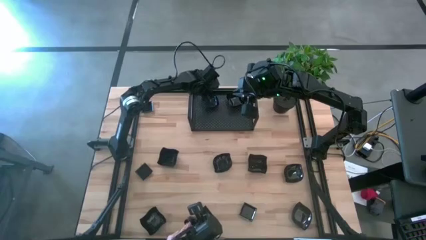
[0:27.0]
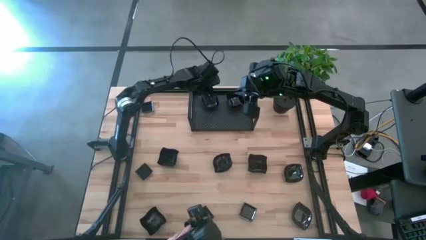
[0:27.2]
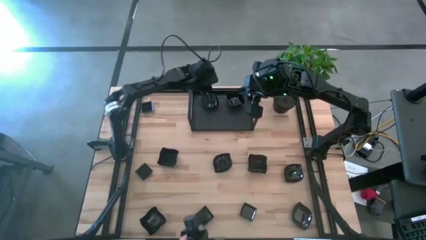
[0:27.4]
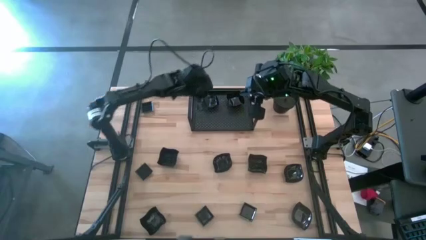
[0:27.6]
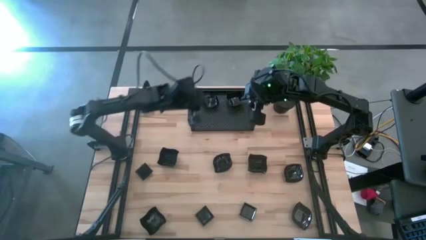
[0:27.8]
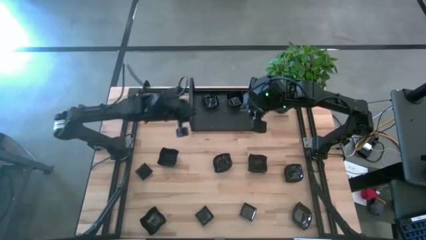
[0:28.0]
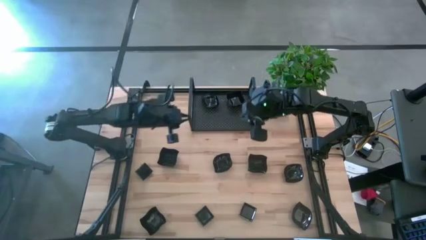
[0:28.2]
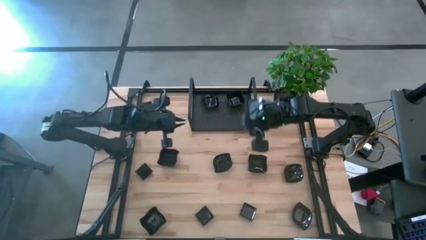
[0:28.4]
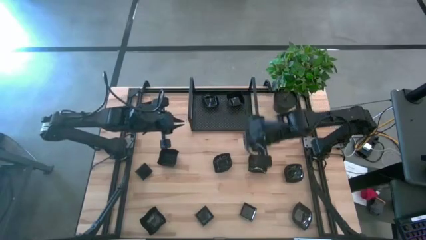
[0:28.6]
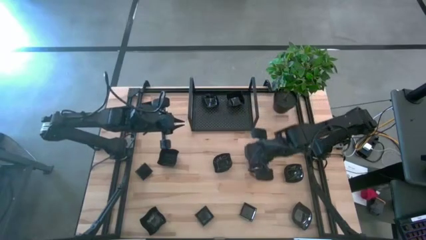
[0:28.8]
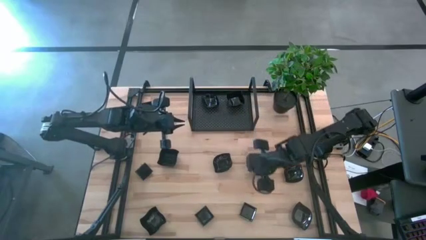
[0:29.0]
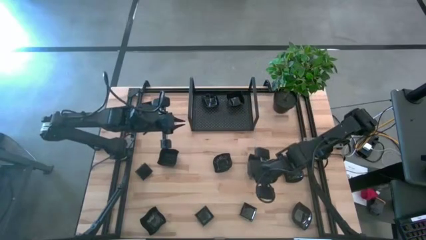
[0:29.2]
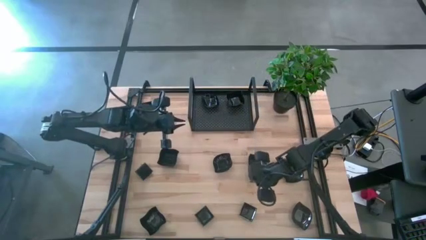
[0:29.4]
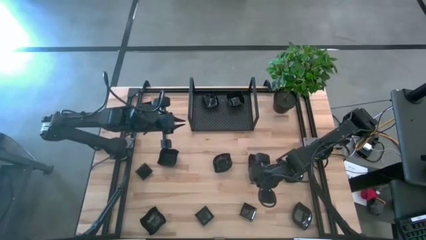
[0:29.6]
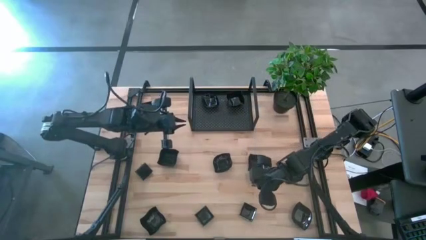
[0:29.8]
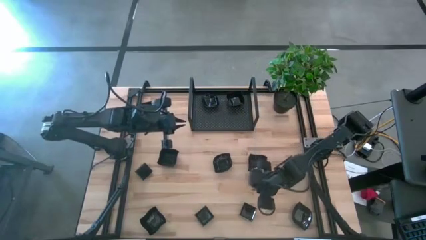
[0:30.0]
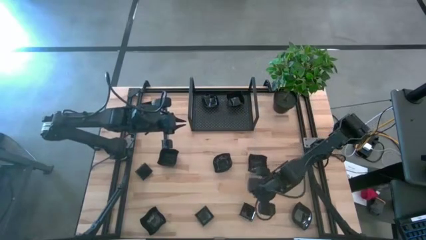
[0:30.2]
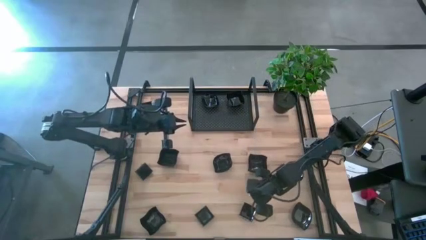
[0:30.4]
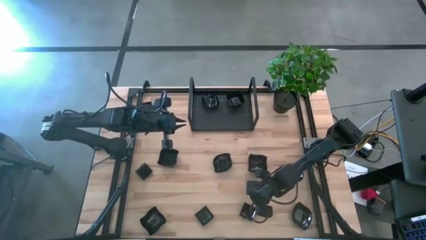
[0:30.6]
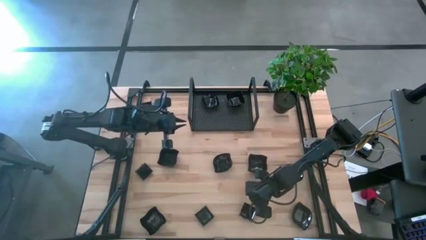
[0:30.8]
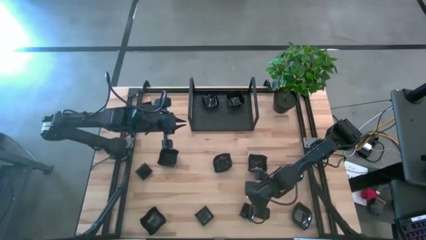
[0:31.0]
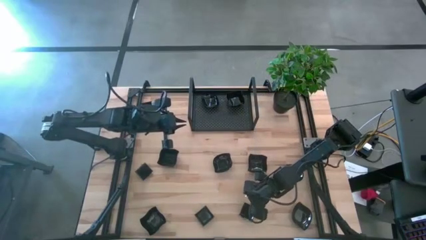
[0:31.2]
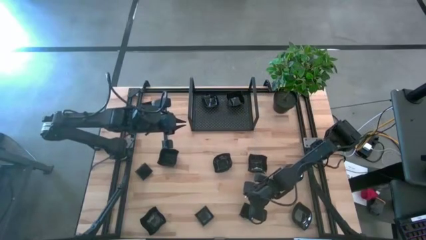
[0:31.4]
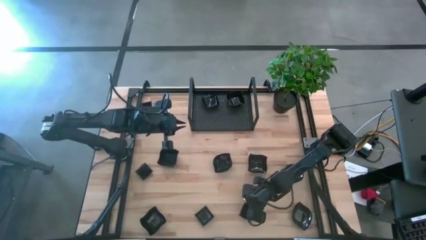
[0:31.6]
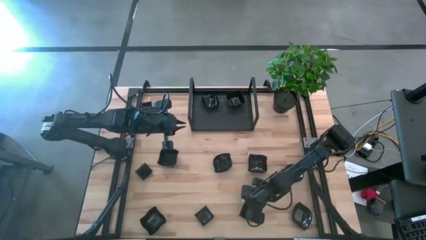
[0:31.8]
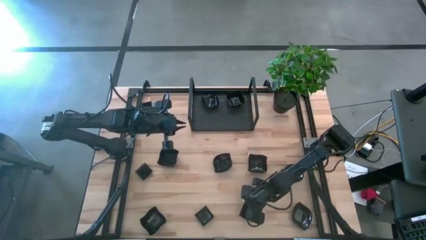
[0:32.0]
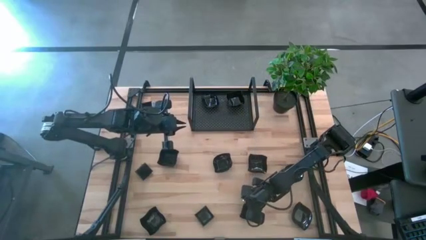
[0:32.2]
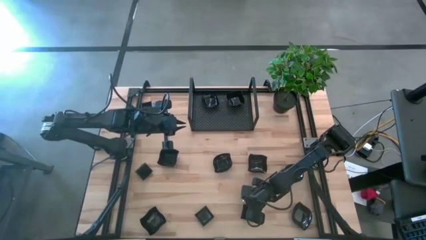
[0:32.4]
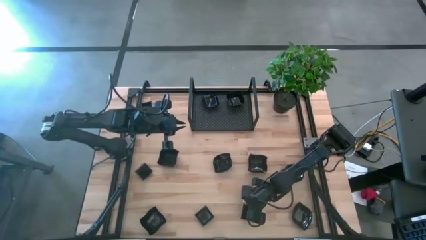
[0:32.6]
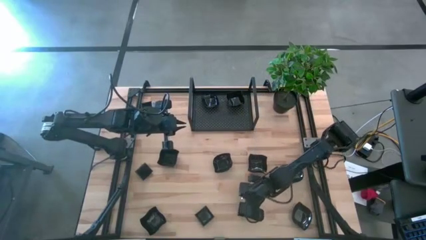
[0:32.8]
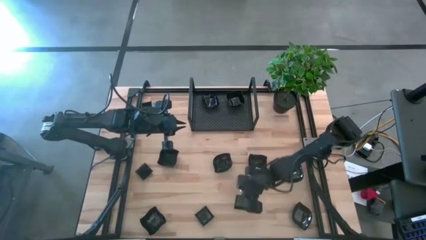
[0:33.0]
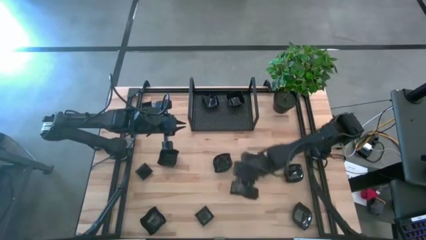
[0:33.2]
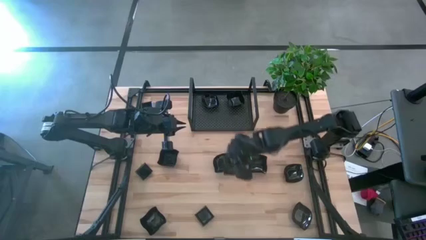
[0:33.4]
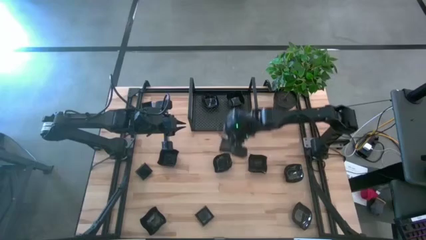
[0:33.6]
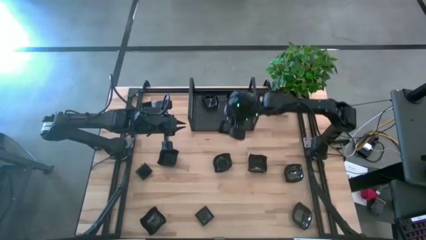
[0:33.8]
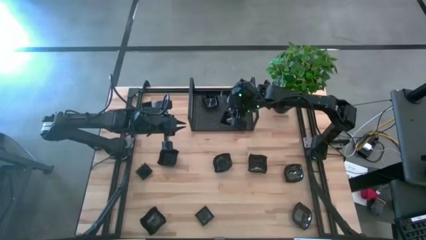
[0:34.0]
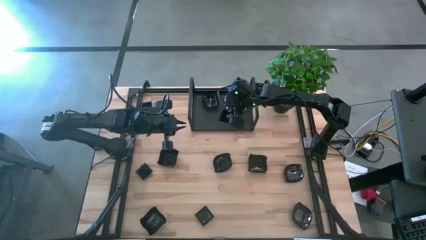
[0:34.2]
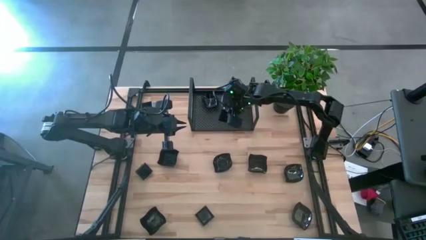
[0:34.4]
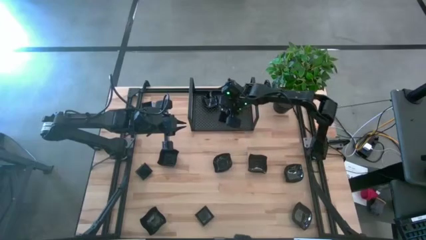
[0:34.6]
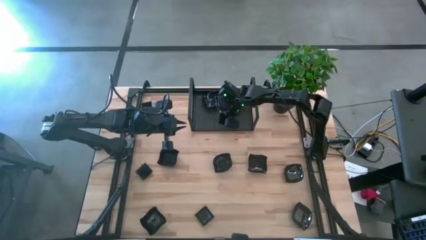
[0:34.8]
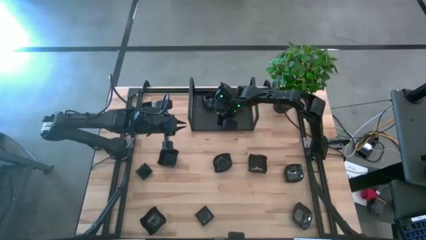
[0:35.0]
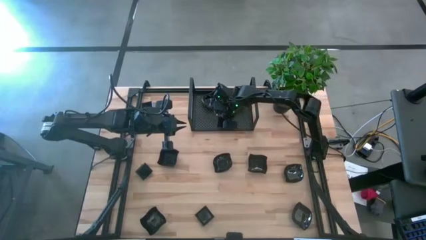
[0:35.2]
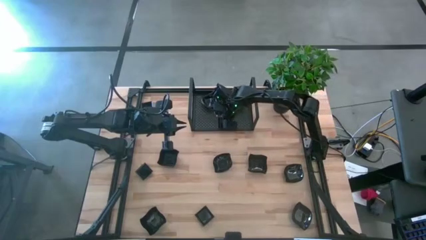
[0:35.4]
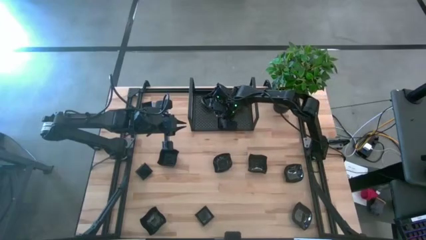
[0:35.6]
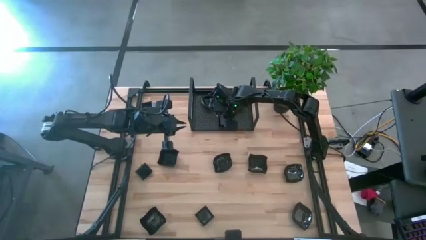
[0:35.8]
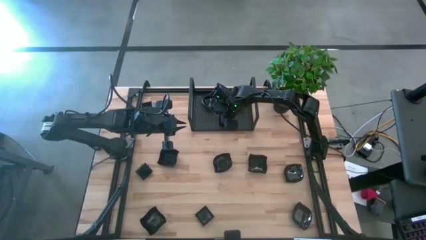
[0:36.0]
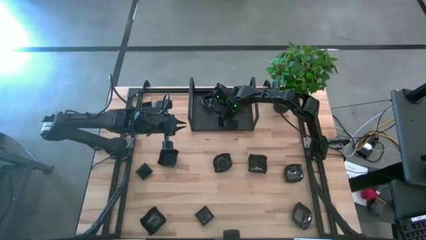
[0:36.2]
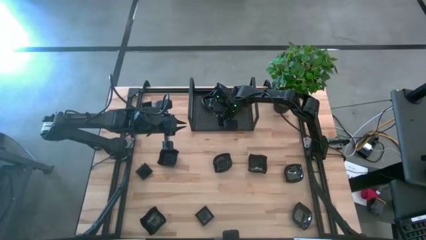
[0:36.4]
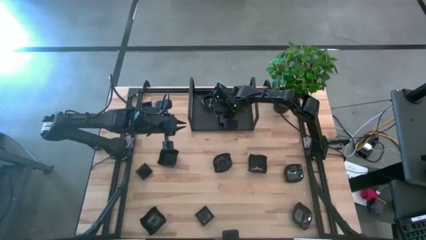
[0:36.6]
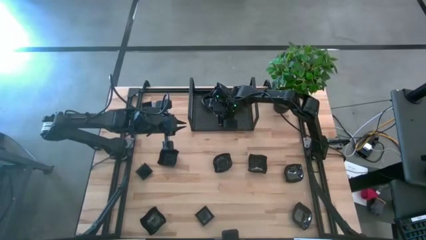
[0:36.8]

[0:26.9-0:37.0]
Task: Pick & Place Mini shaped plates
Put the black square plate on the shelf

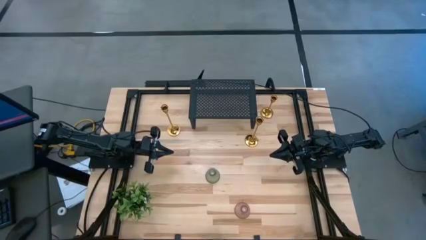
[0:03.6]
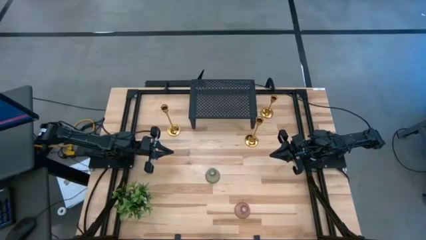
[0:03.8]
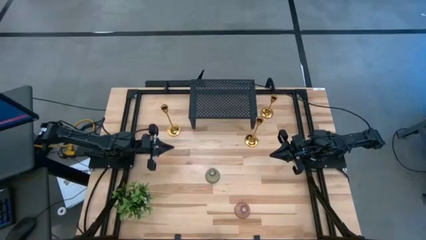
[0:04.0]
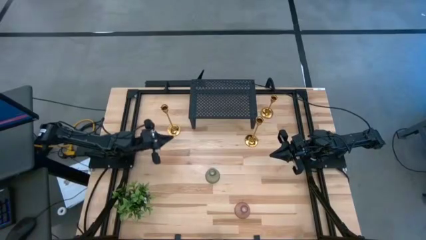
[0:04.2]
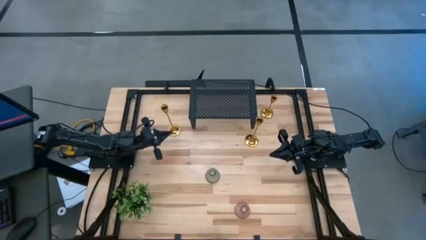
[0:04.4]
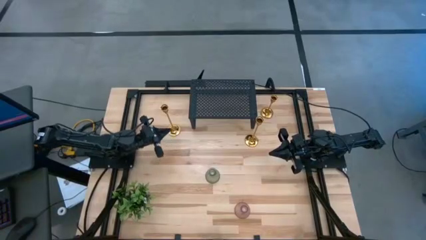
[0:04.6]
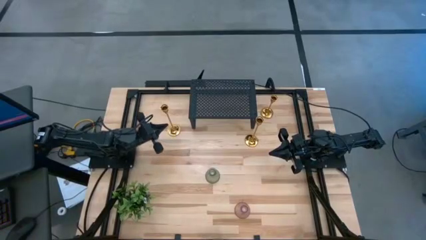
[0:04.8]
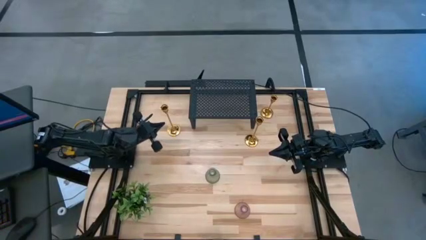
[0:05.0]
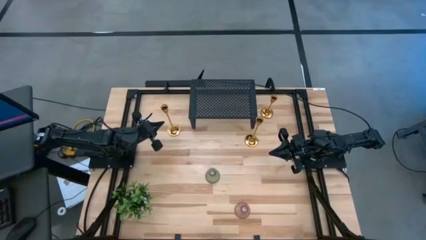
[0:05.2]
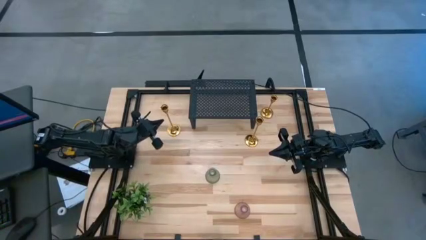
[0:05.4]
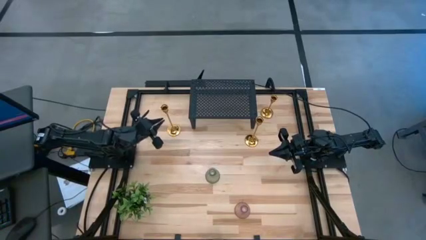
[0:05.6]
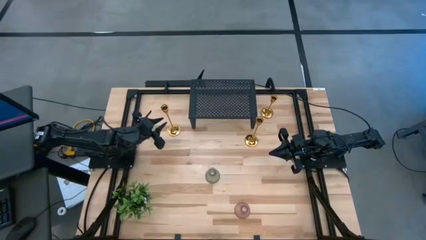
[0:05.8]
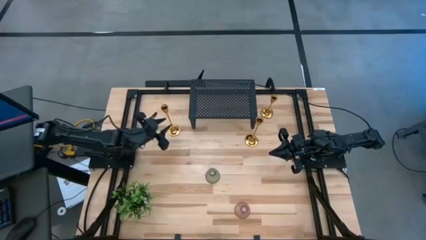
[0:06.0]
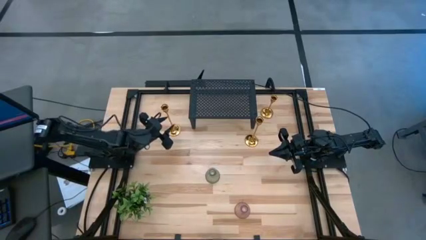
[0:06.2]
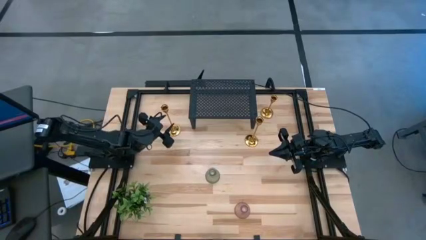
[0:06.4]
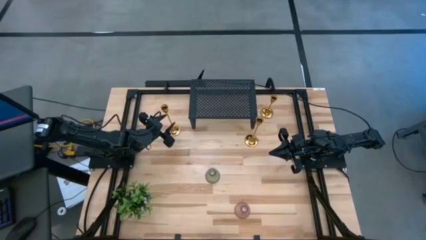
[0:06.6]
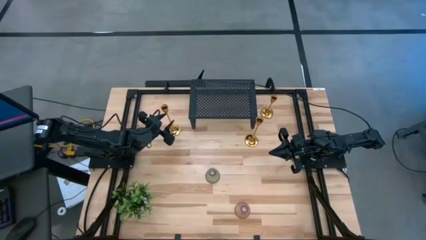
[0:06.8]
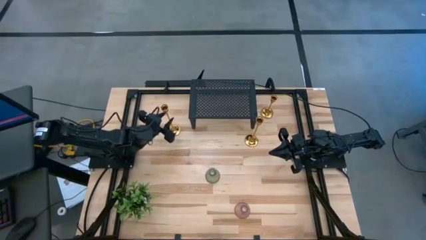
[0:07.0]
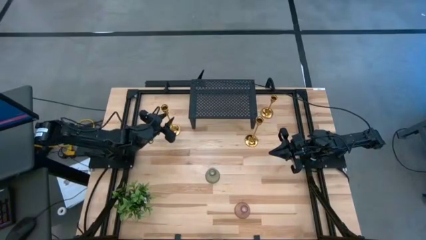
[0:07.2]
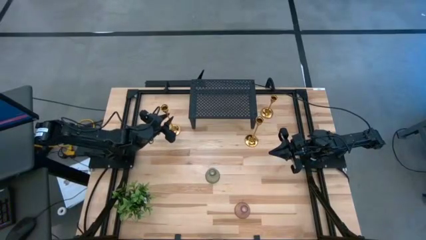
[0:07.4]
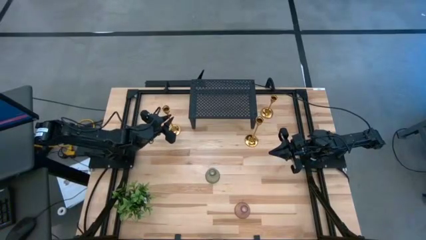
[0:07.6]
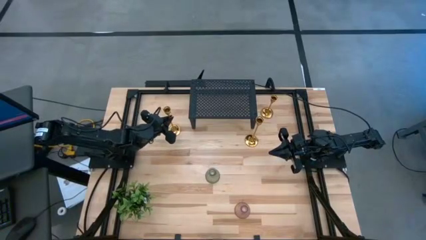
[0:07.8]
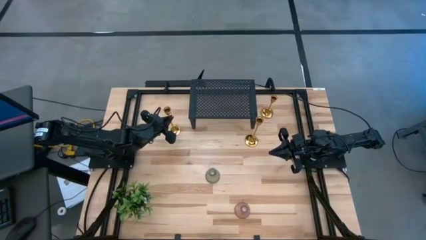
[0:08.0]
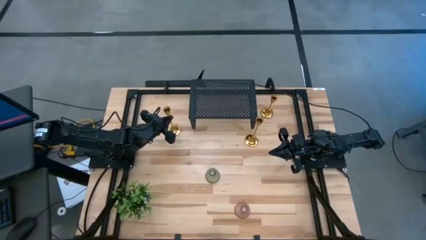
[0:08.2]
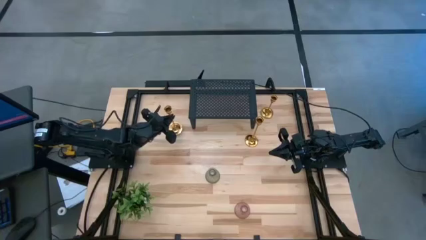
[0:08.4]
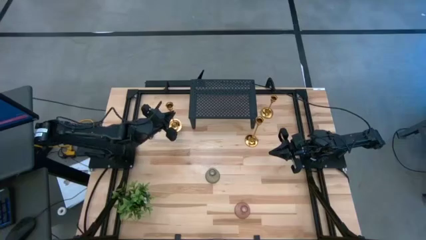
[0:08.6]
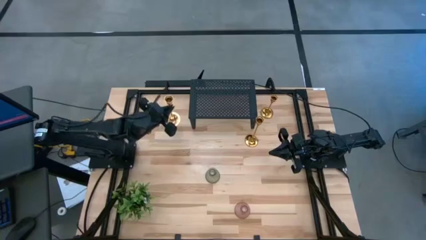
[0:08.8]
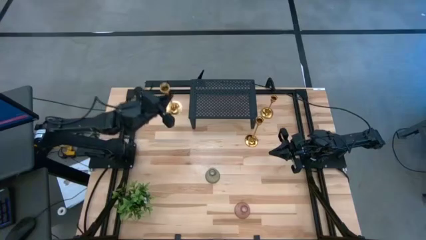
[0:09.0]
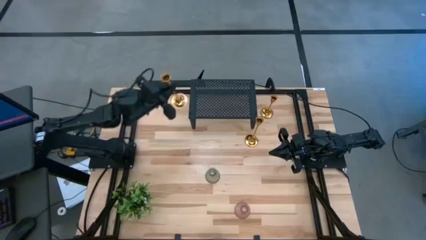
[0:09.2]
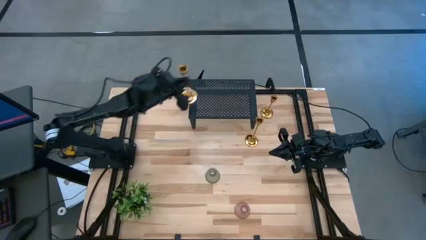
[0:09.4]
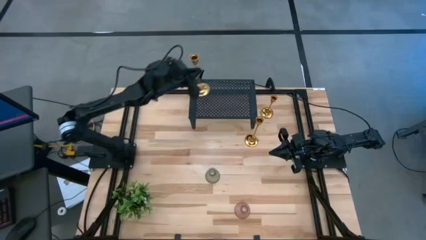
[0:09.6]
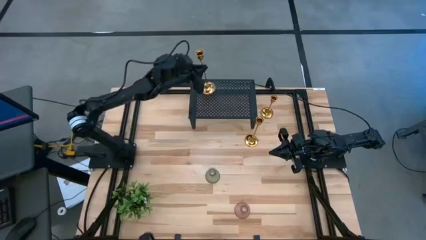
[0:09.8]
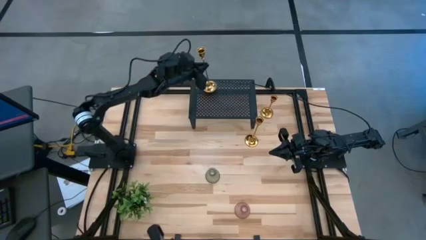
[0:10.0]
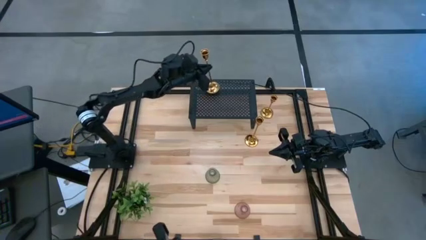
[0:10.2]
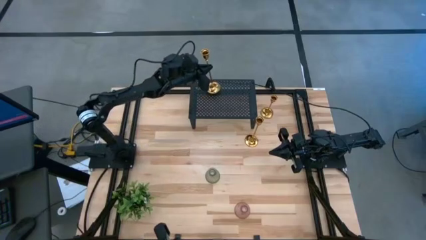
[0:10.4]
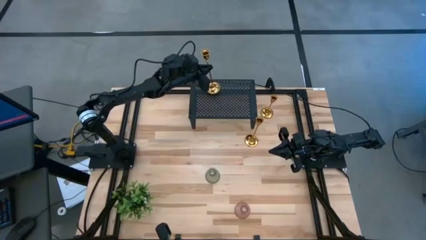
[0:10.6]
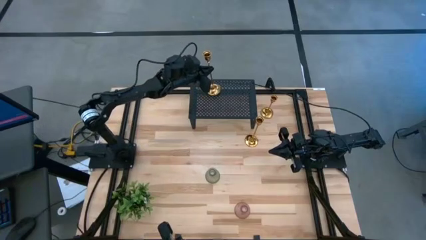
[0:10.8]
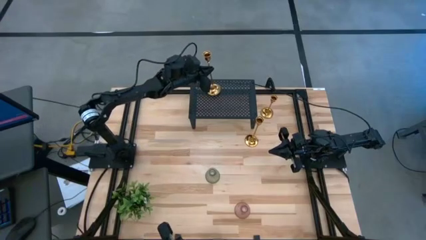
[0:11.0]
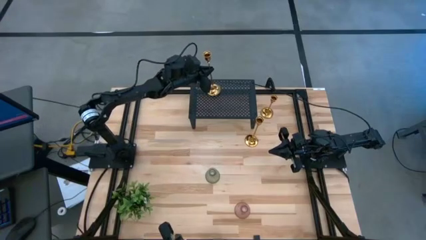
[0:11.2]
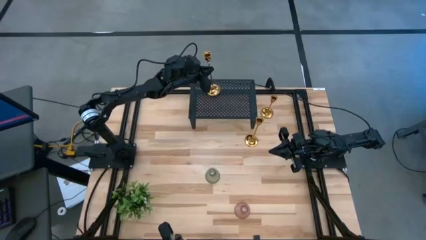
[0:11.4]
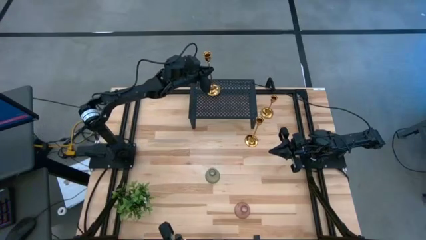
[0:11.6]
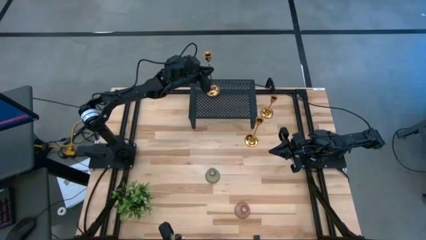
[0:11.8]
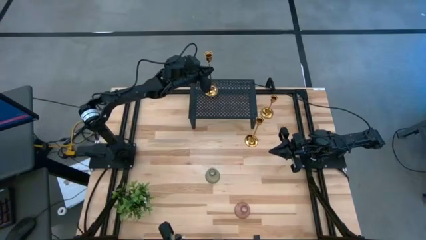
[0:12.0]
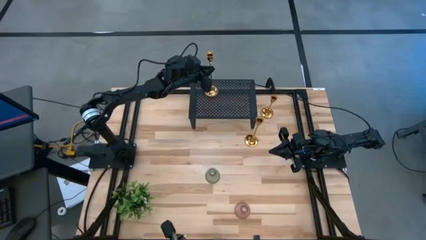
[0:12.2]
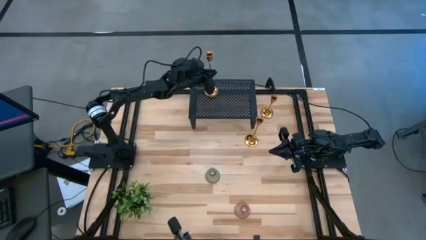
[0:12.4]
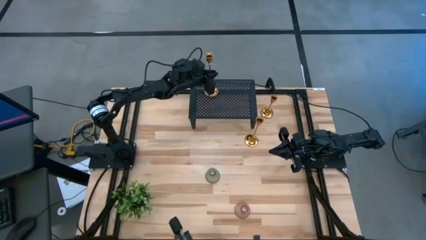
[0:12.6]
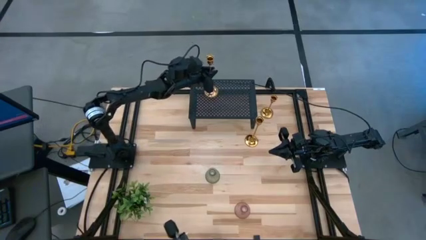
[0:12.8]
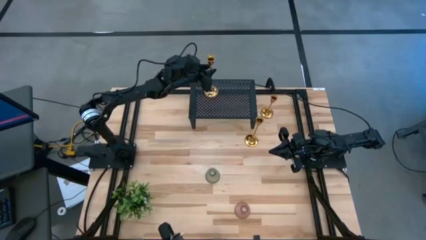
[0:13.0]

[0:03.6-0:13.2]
Task: Pick & Place candle stick holders
Put the left gold candle holder on the shelf
